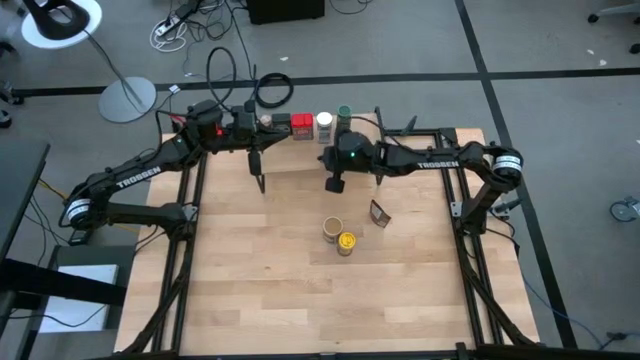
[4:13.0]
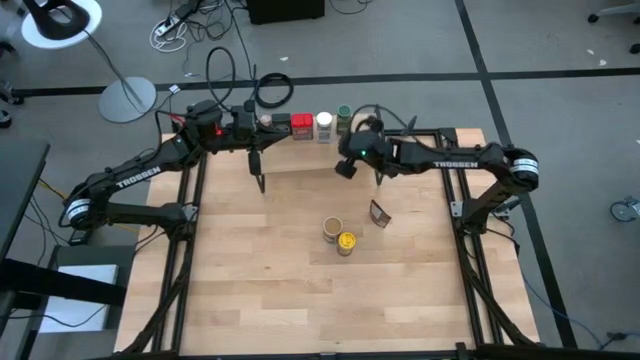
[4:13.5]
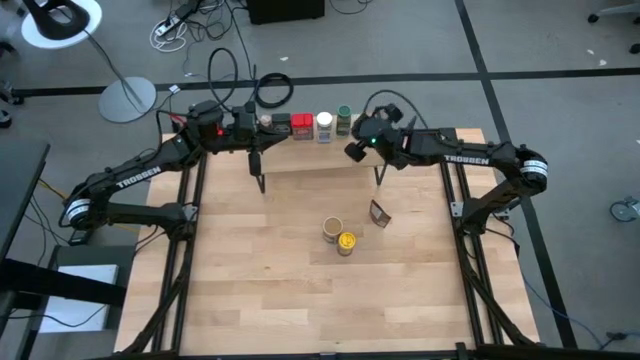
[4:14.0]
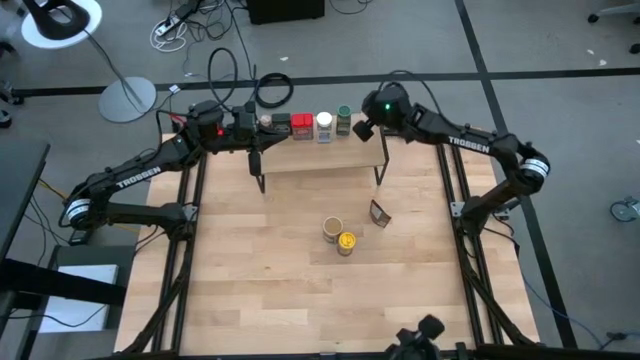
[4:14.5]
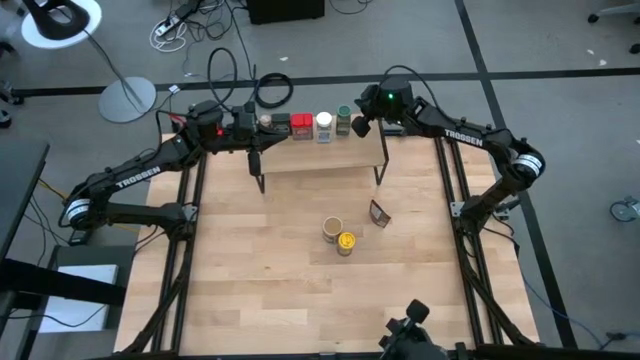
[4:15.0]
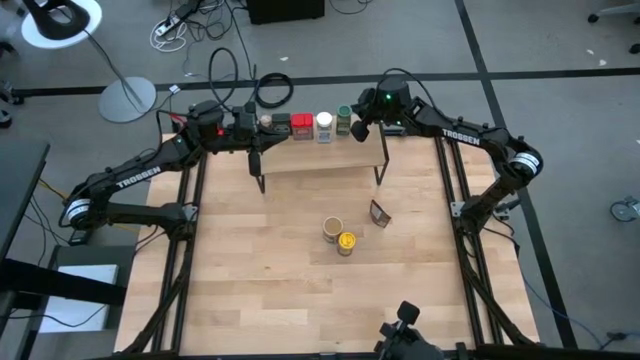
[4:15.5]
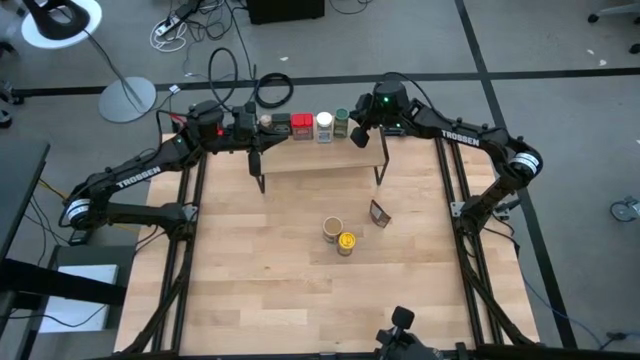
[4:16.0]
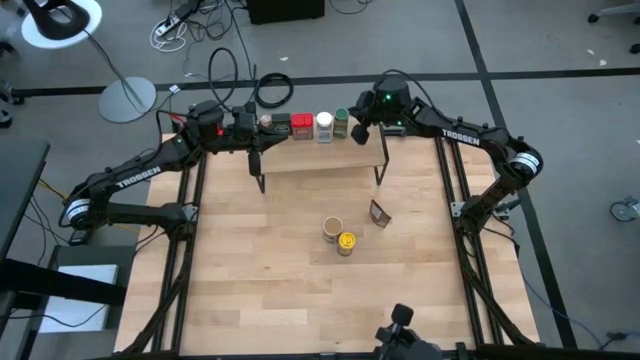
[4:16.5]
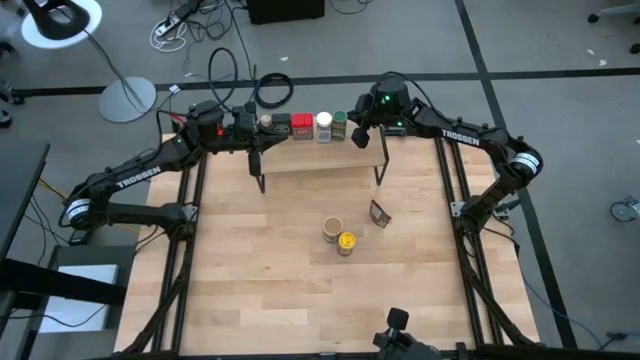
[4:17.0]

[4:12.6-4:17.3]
Task: Shelf spices
Adjust the green seasoning bottle on the shelf

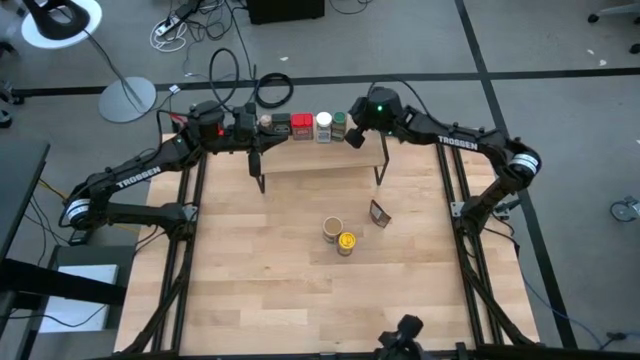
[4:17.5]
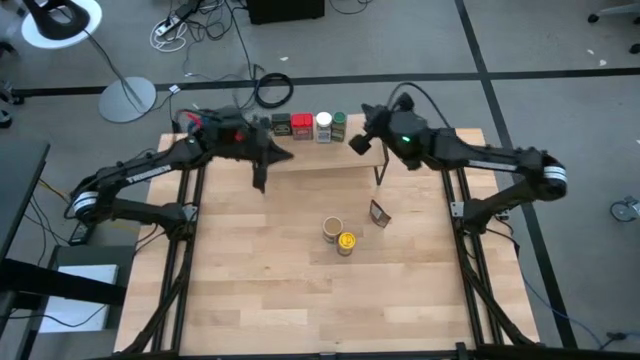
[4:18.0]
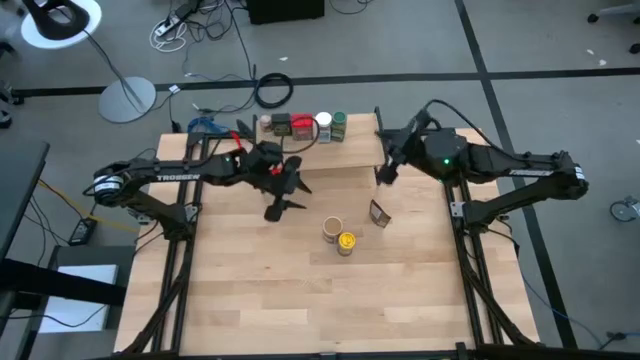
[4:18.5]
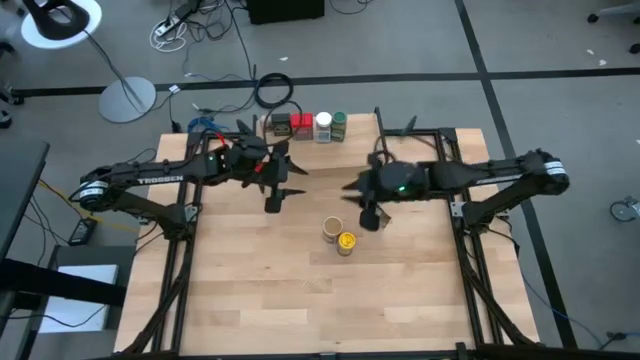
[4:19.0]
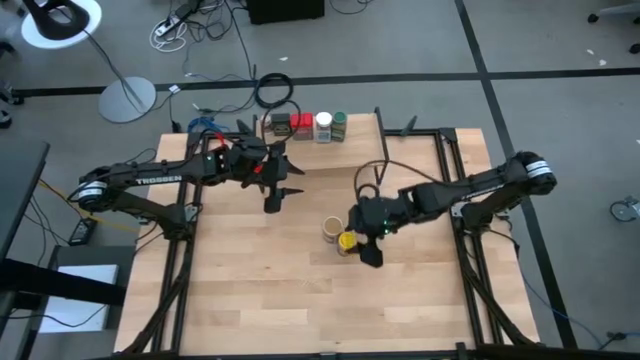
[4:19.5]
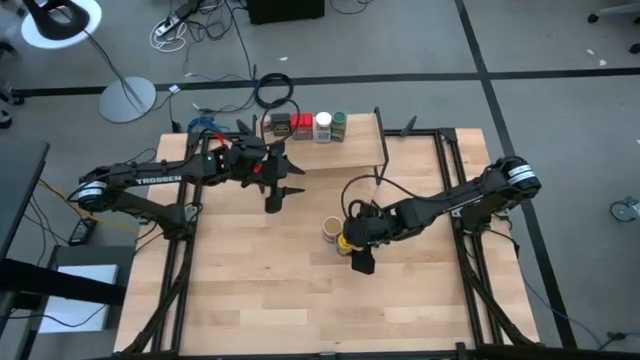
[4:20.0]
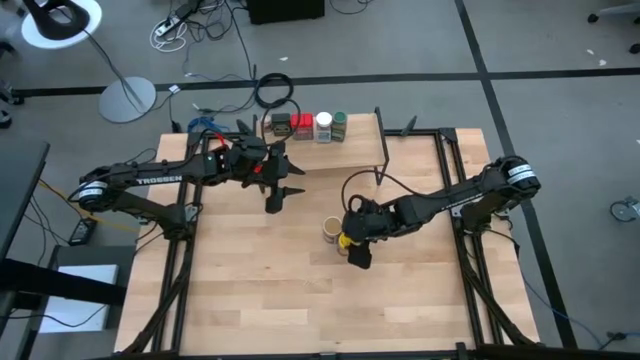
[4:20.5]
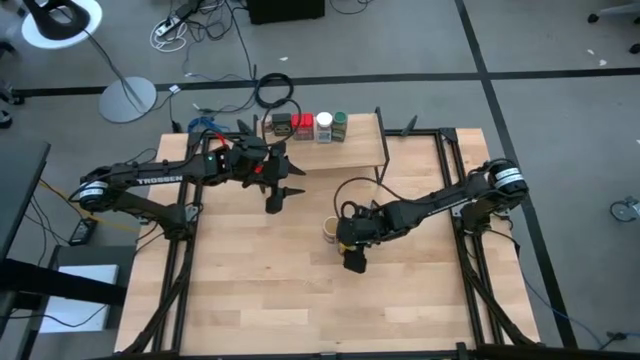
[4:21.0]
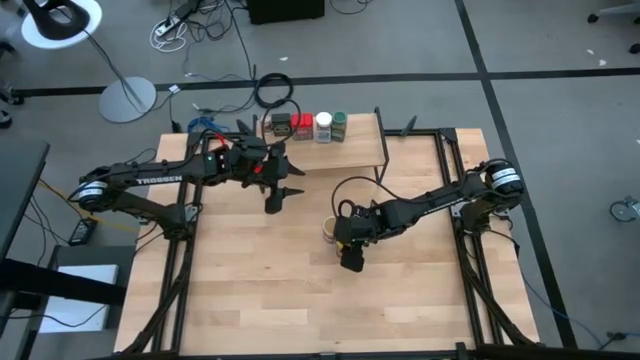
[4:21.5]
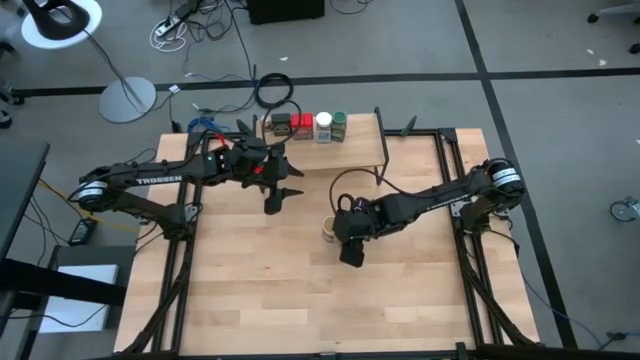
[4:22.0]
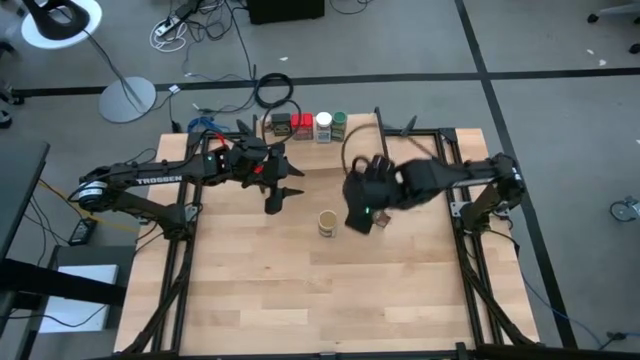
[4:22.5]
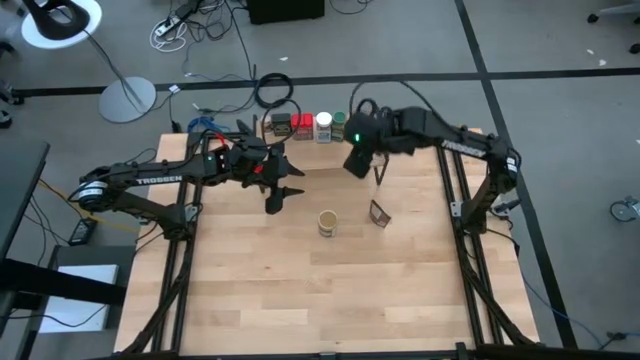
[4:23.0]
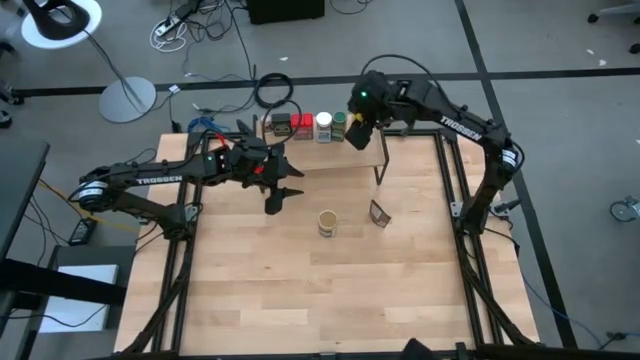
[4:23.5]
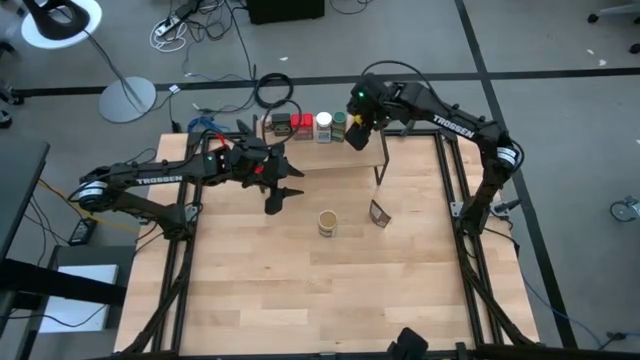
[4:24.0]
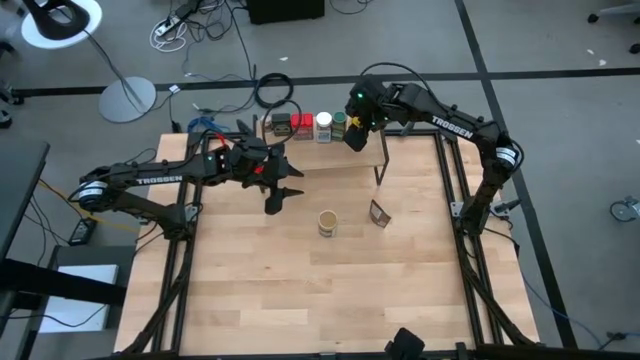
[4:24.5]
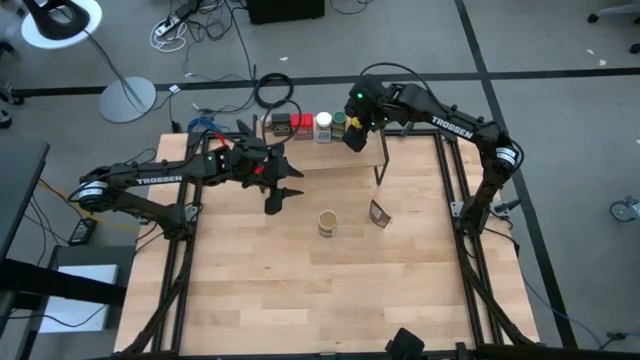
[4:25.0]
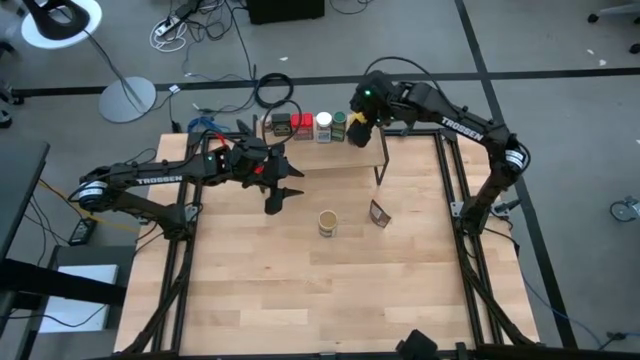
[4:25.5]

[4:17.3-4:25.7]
Put the yellow seasoning can on the shelf

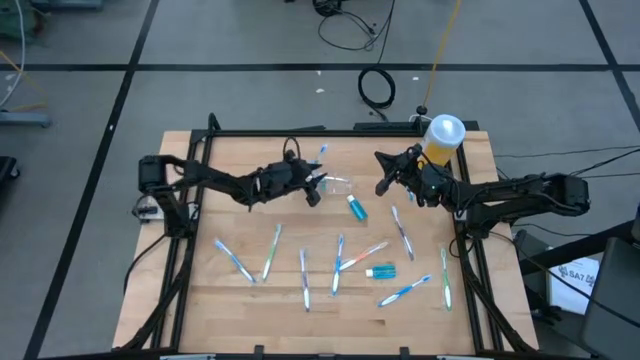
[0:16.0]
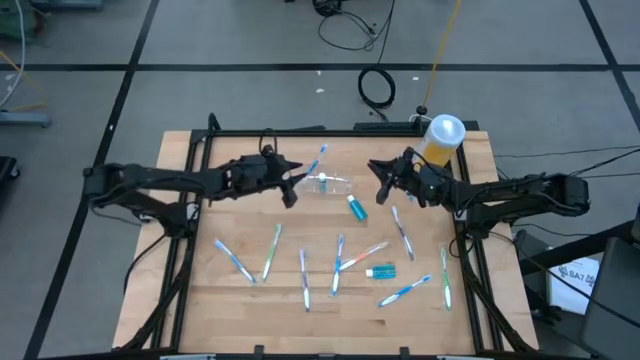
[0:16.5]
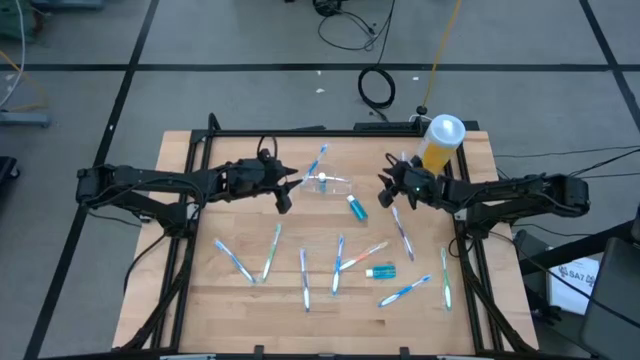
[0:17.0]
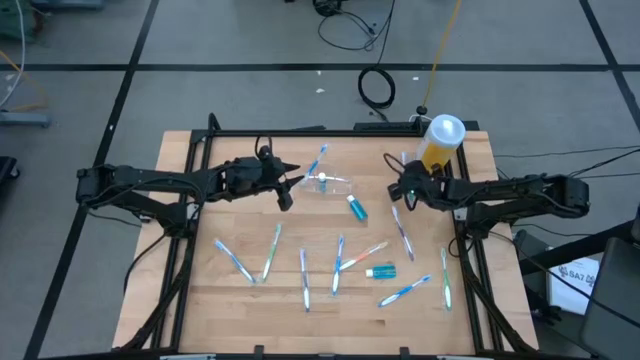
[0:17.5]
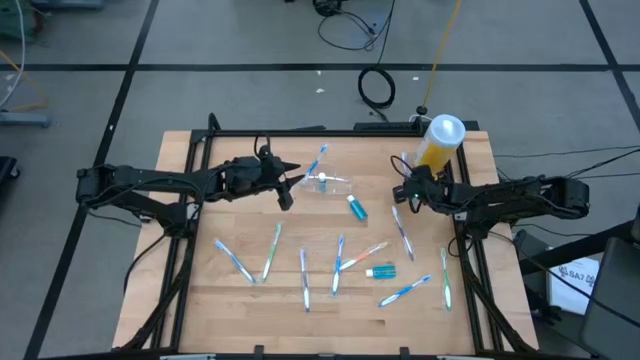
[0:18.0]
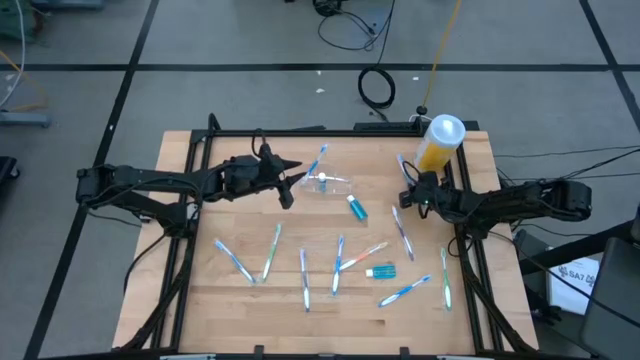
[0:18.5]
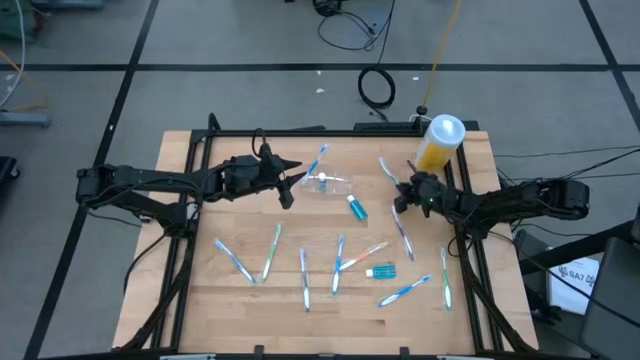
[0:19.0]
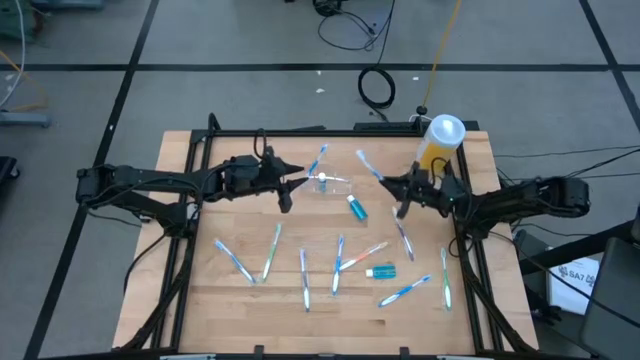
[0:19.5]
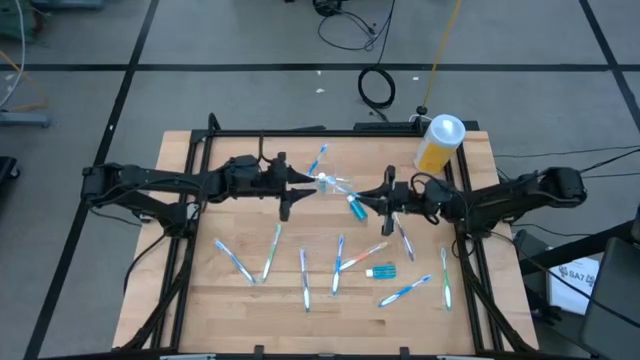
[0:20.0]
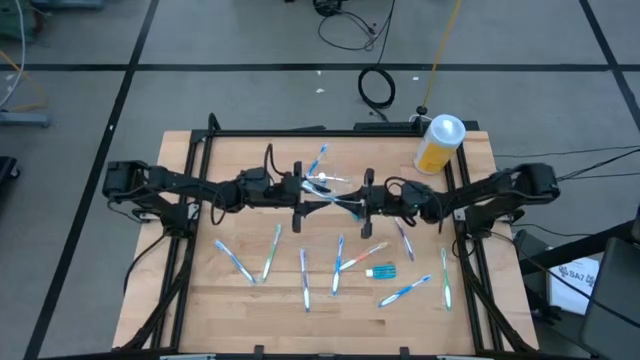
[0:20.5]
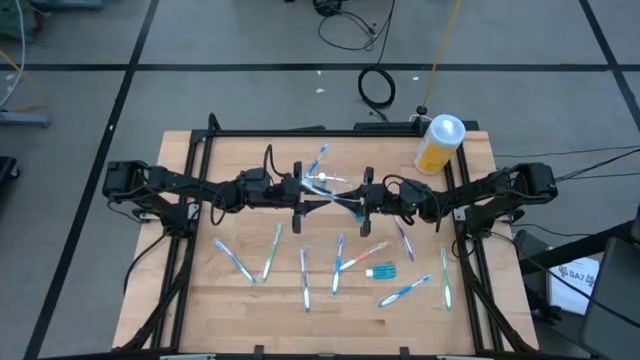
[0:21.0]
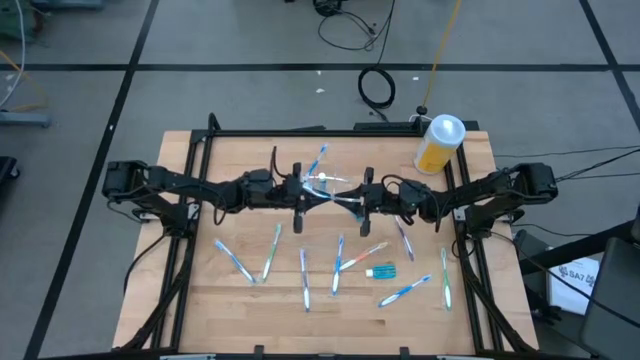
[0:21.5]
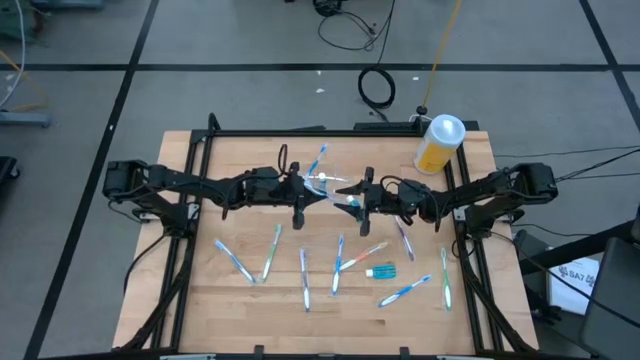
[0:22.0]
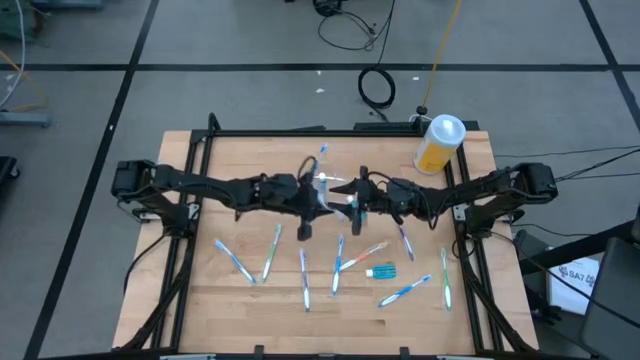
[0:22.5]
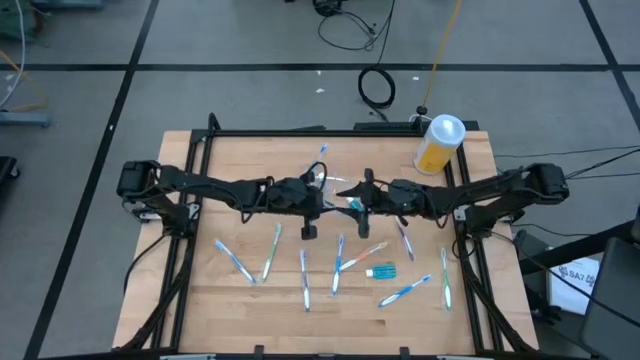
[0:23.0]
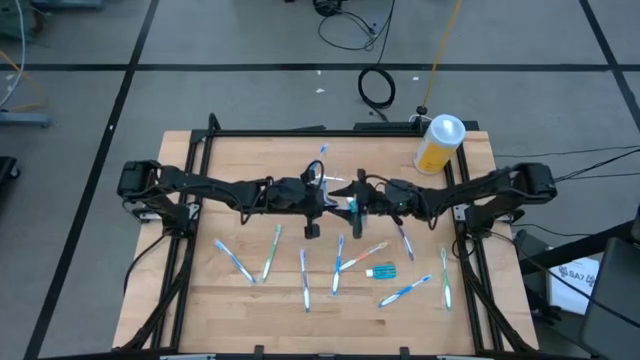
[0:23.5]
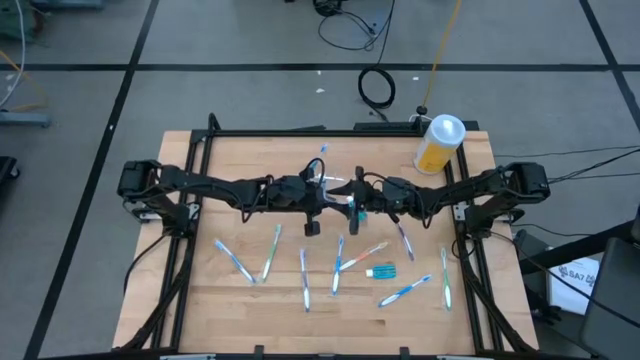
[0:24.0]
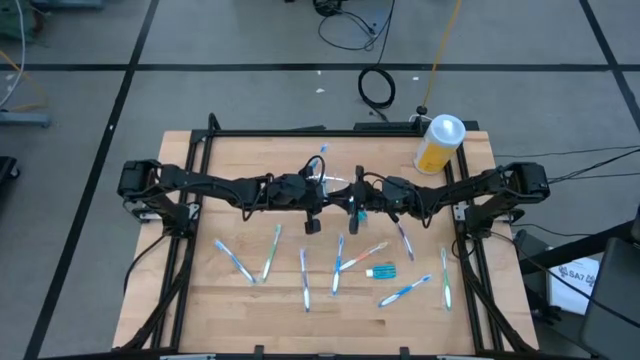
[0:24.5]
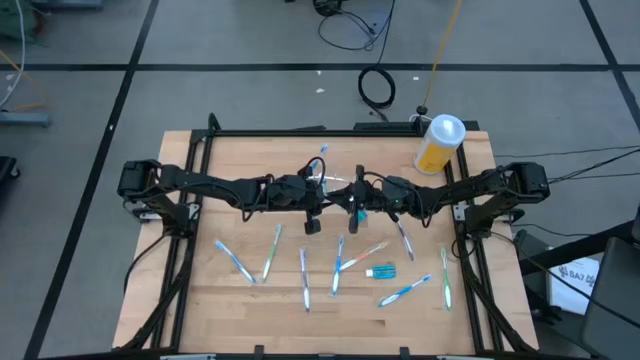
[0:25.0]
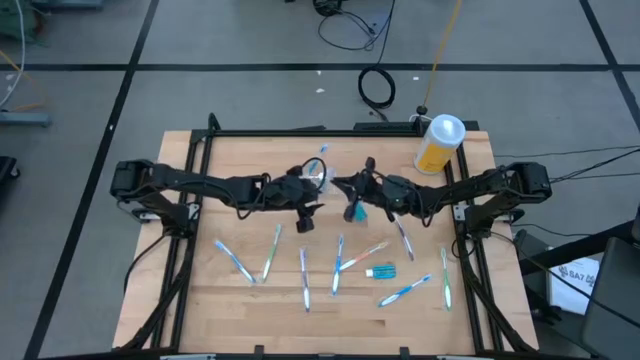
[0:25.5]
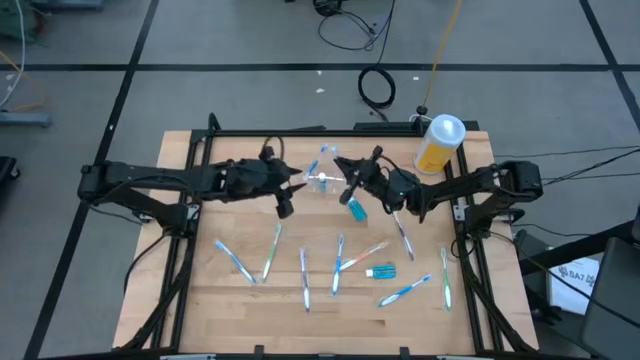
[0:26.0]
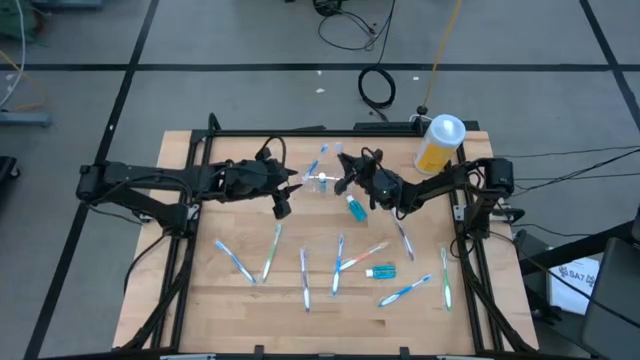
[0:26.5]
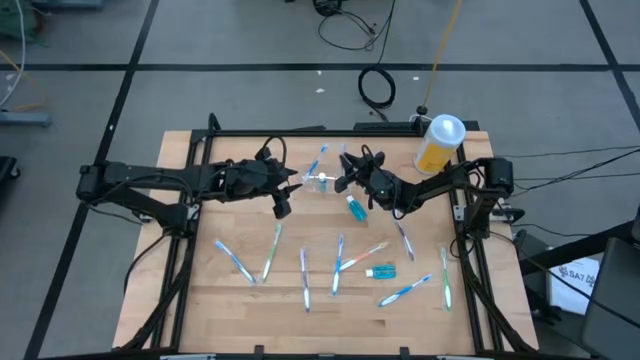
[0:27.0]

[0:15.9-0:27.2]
Task: Pick & Place toothbrushing station
Put the blue toothbrush into the transparent organizer
